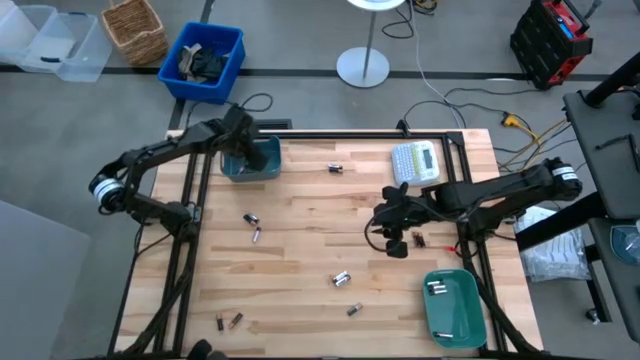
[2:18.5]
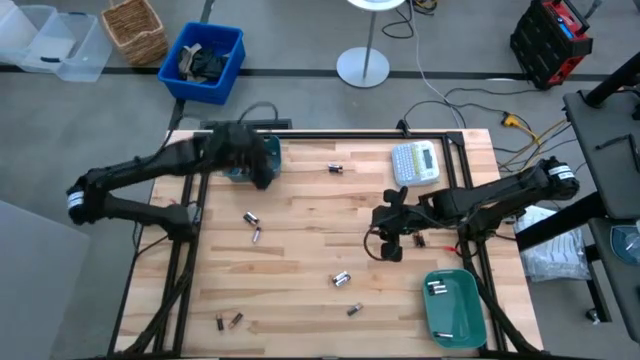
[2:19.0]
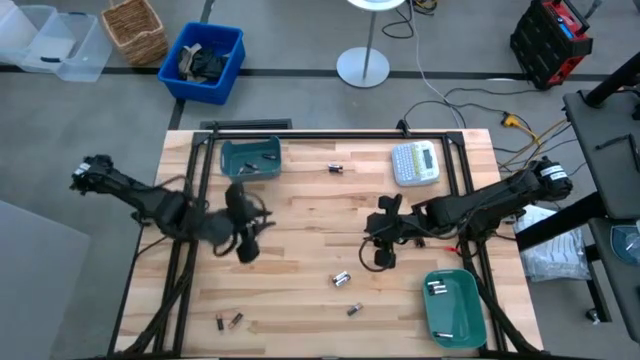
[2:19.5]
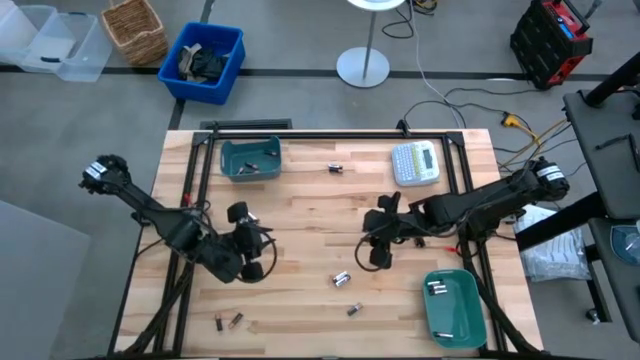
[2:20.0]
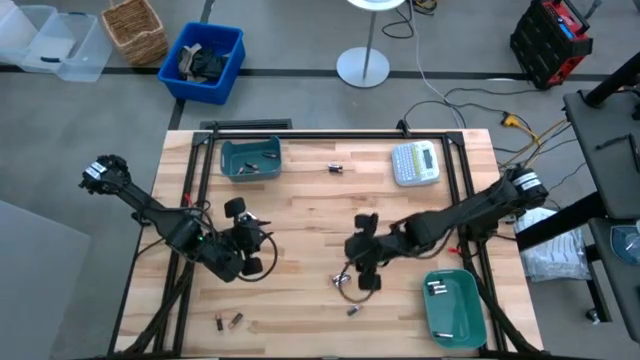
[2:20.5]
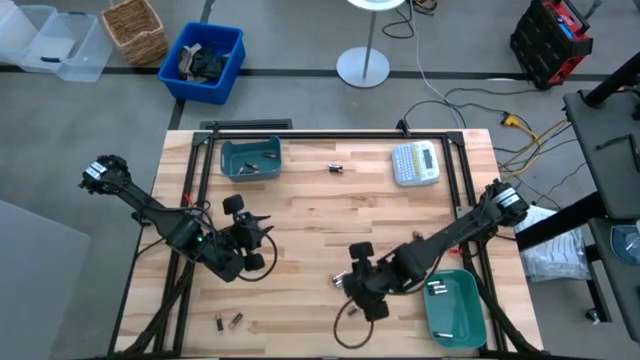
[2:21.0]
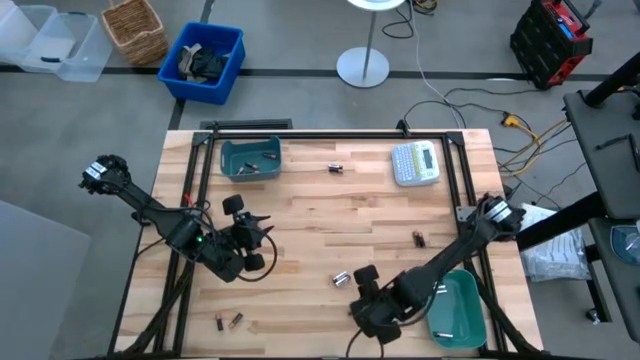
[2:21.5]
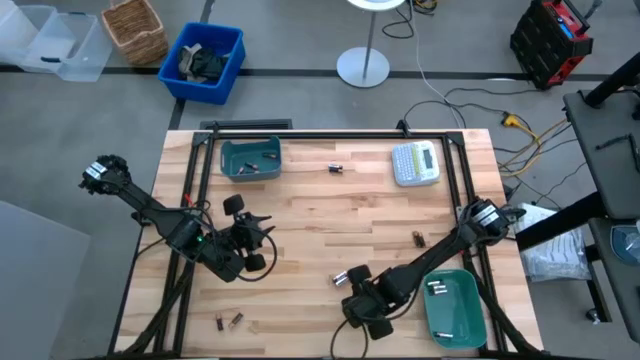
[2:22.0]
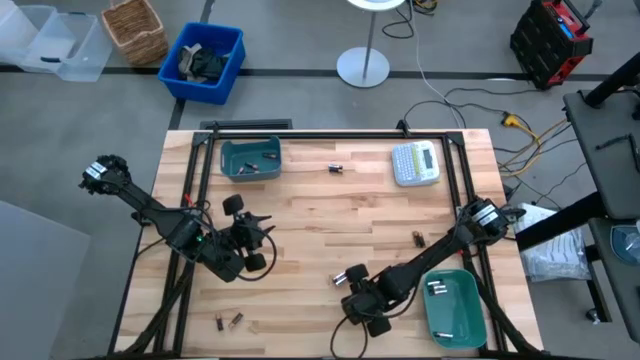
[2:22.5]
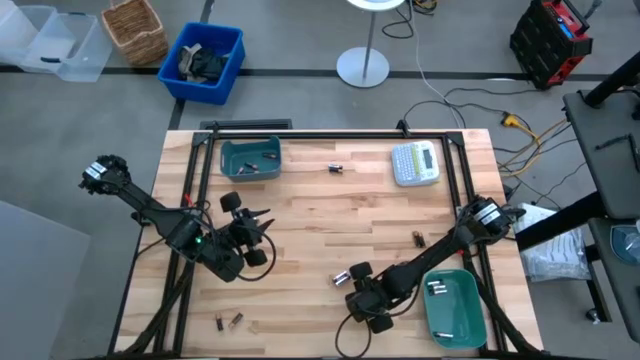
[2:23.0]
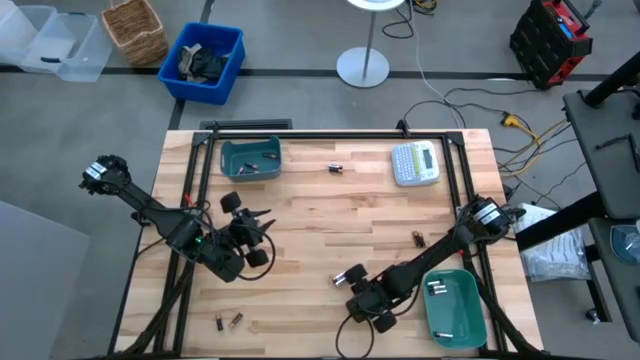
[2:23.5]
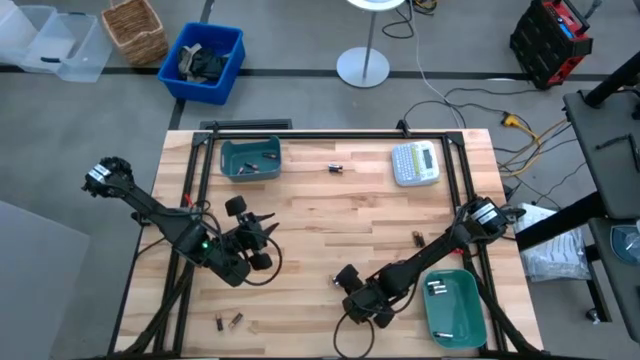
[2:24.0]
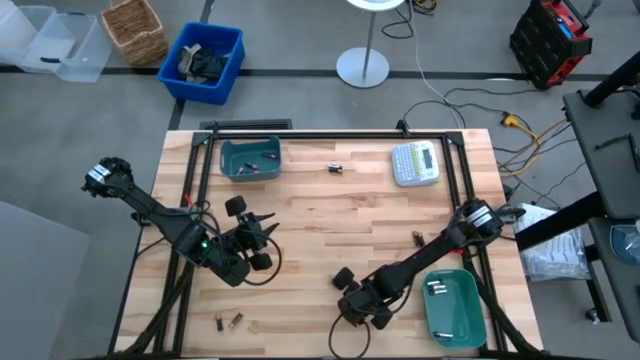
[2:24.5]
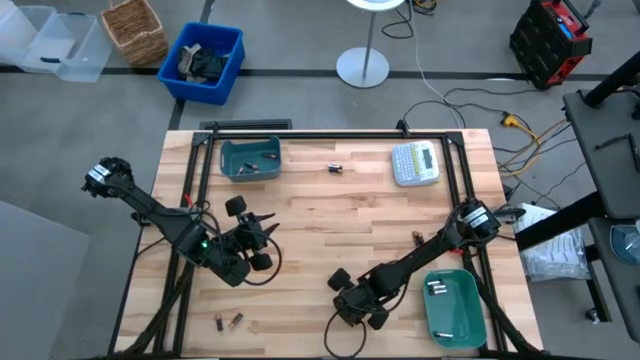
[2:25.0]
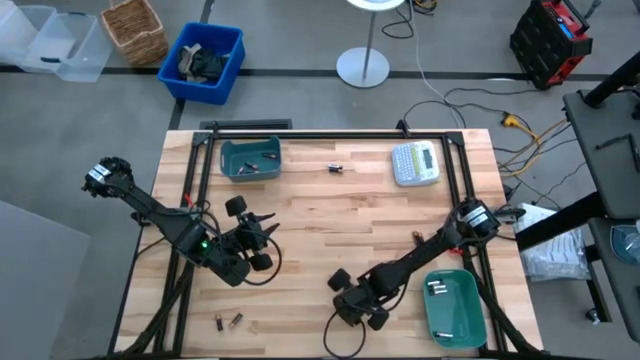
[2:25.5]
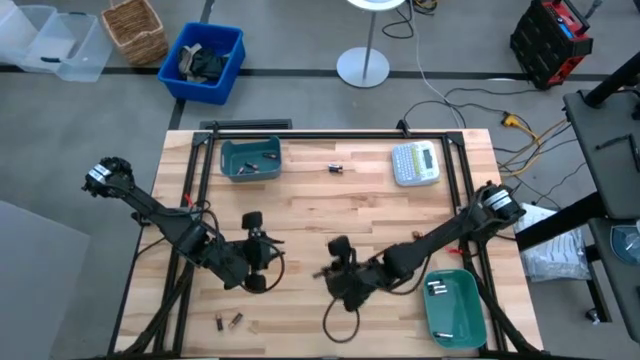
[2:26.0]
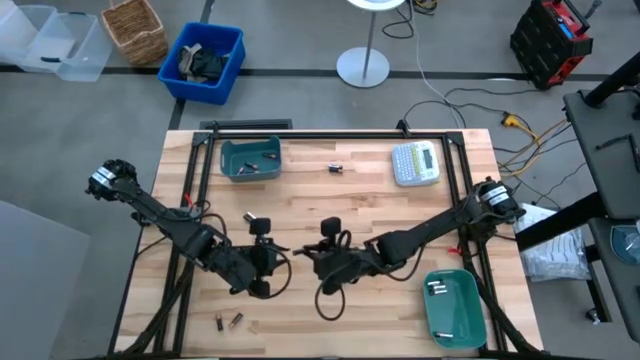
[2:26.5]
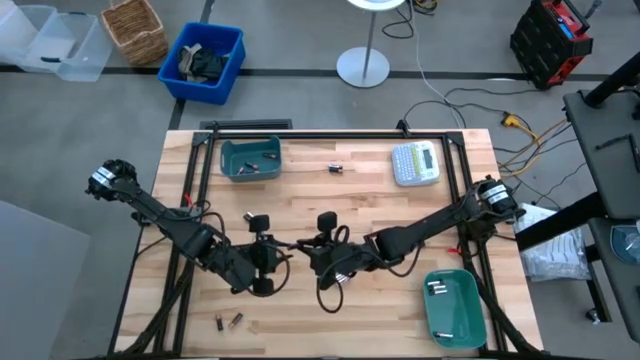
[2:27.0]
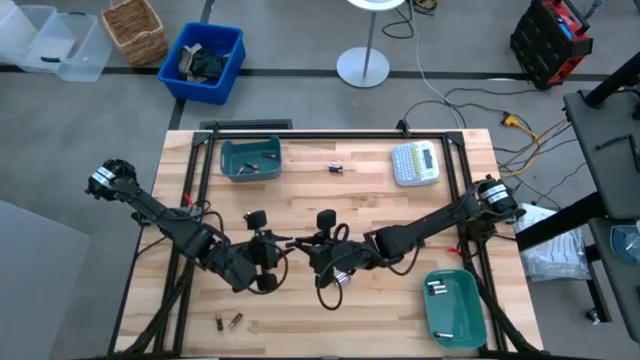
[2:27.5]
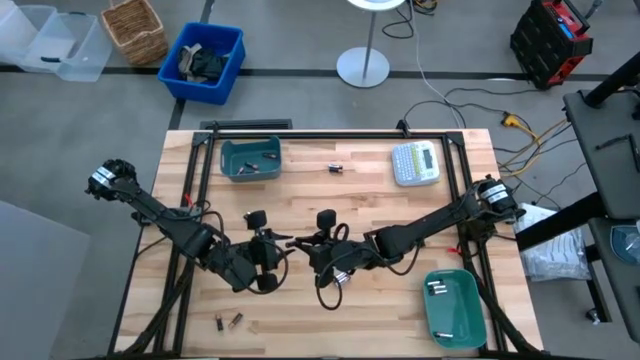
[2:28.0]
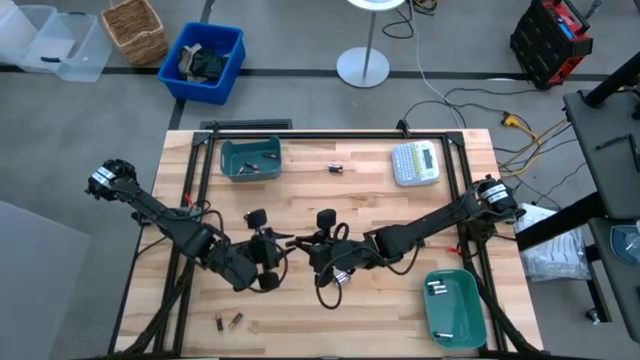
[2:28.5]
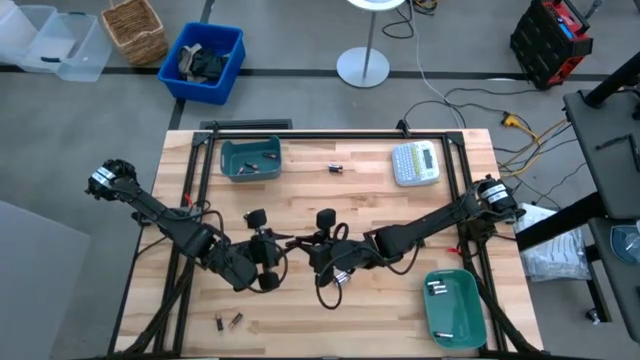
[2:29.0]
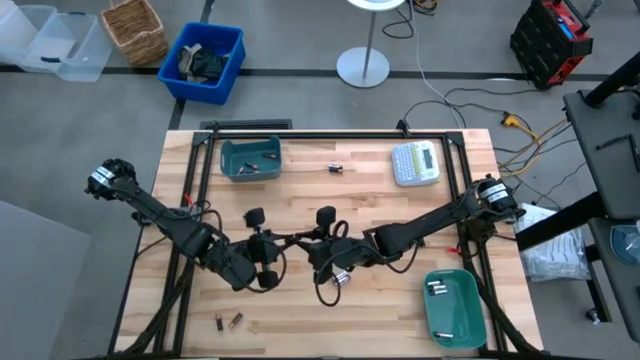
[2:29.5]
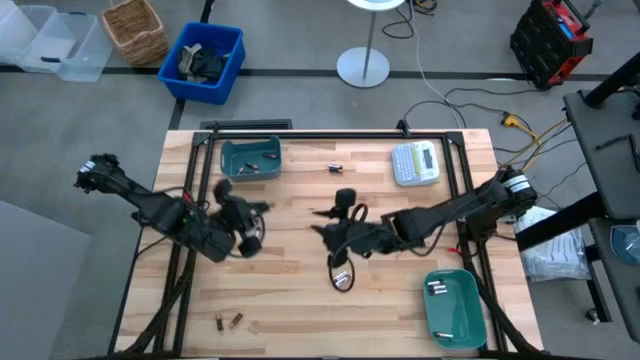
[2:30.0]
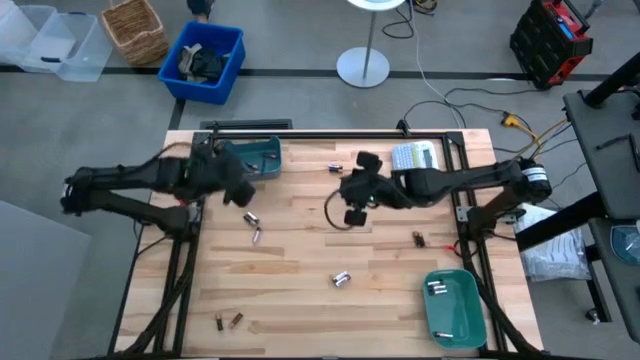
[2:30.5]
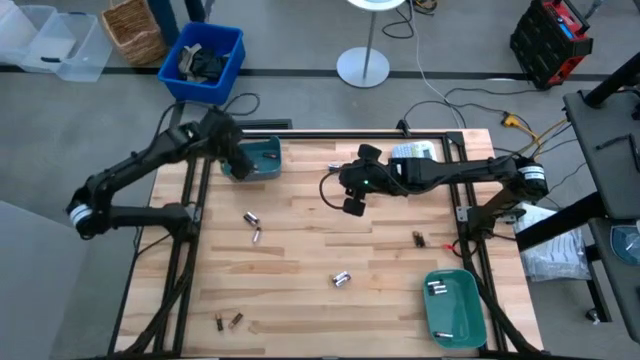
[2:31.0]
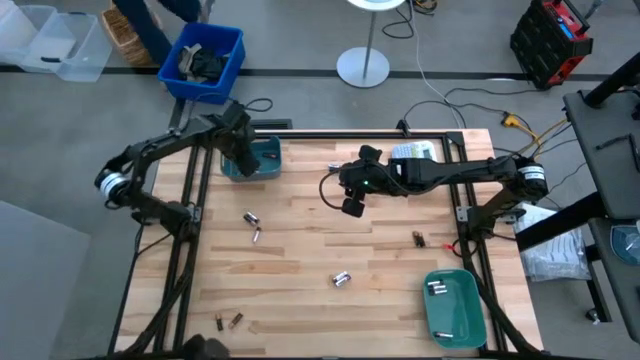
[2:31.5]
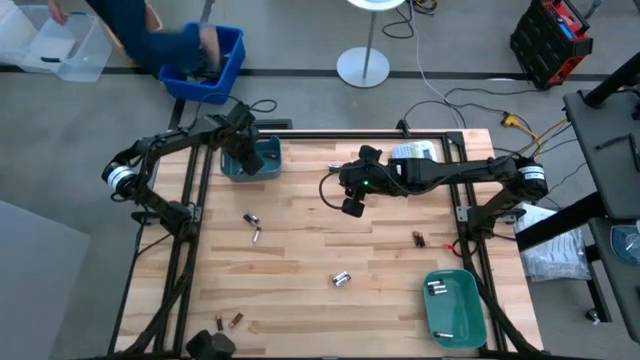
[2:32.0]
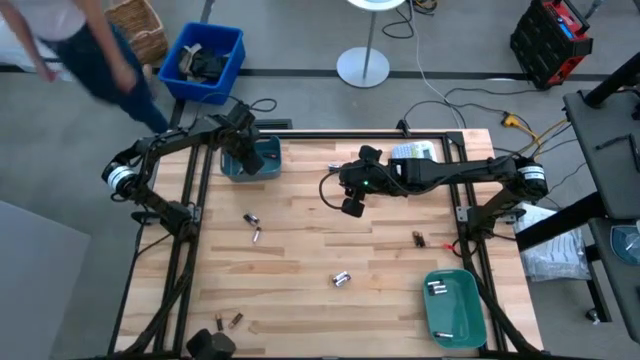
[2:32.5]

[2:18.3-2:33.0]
Task: Sort batteries
Put the black battery into the blue bin

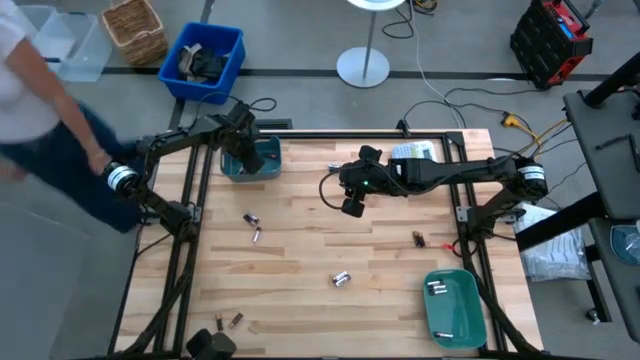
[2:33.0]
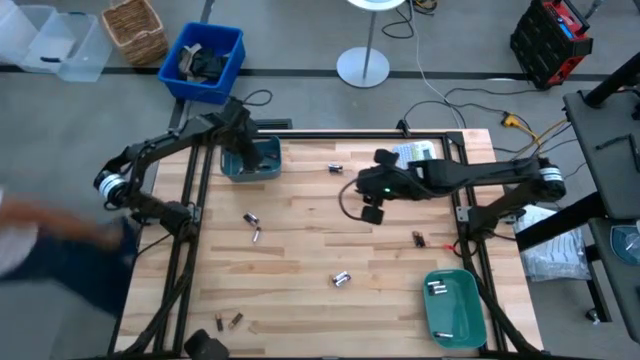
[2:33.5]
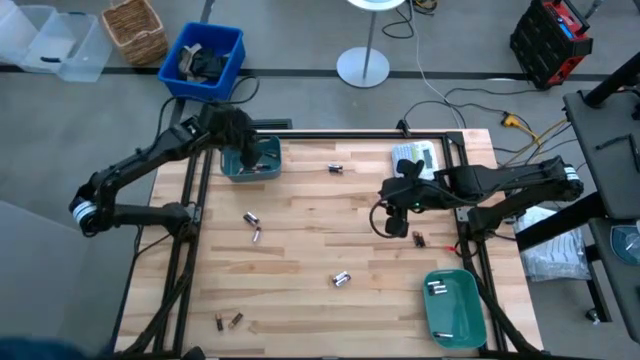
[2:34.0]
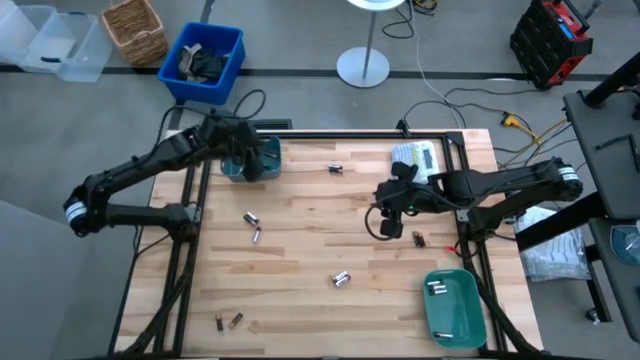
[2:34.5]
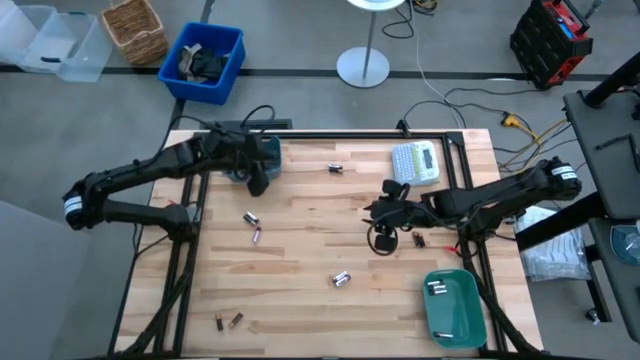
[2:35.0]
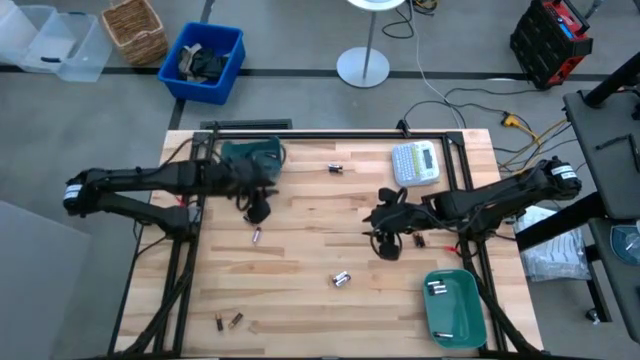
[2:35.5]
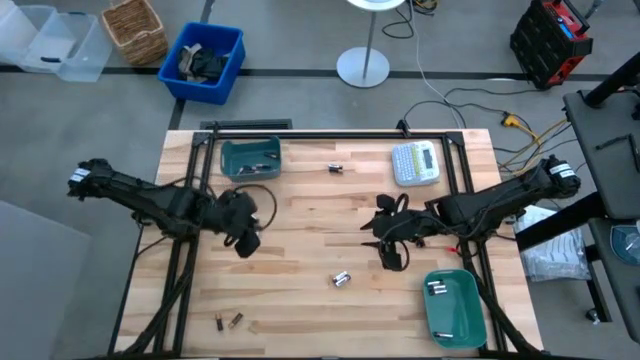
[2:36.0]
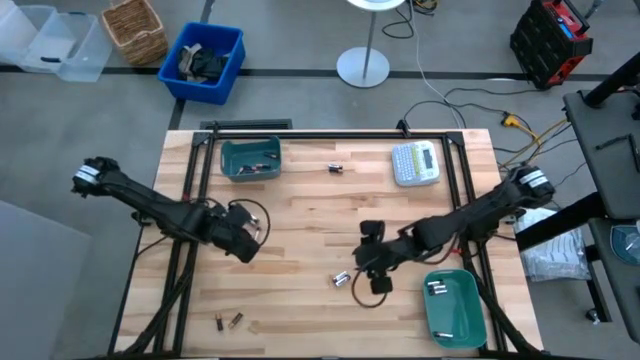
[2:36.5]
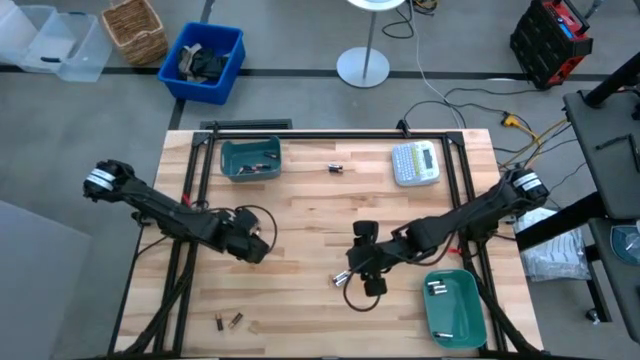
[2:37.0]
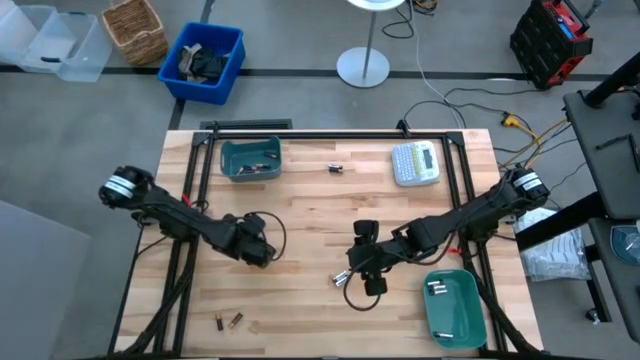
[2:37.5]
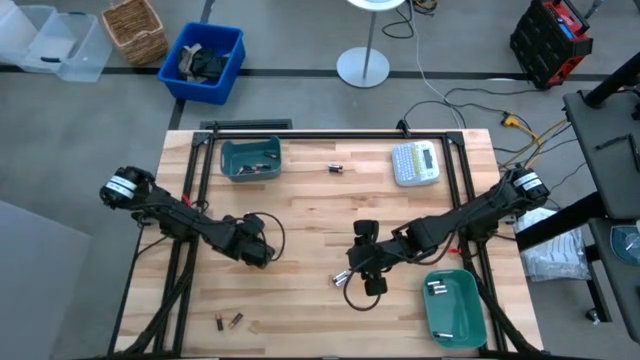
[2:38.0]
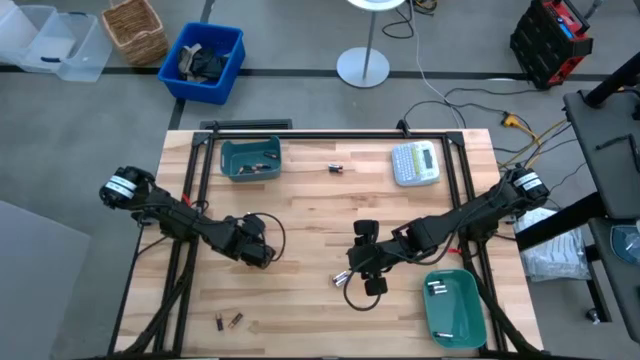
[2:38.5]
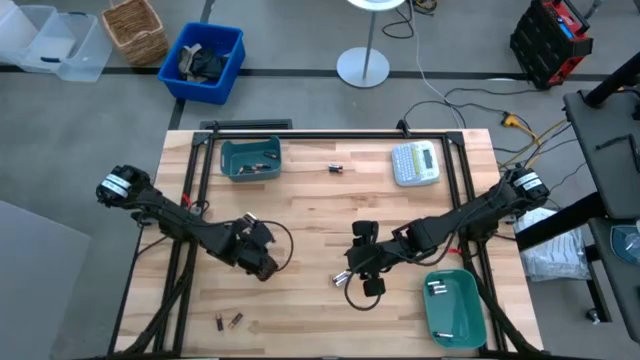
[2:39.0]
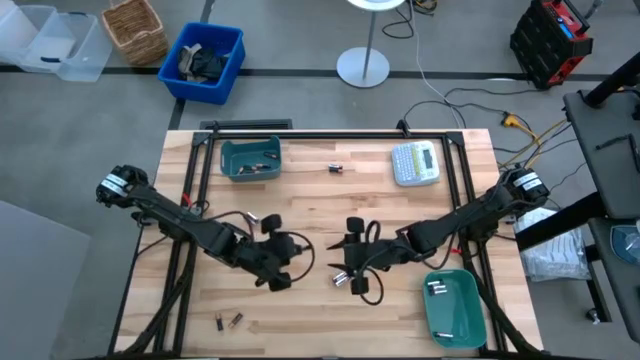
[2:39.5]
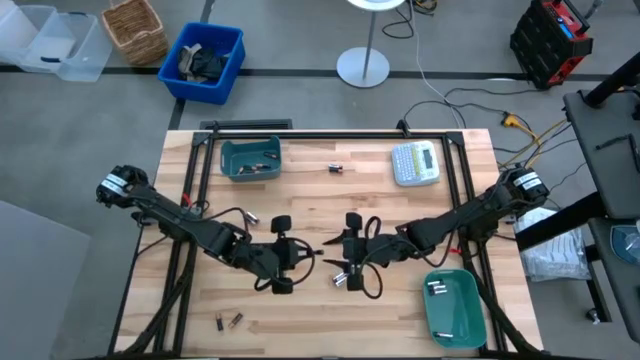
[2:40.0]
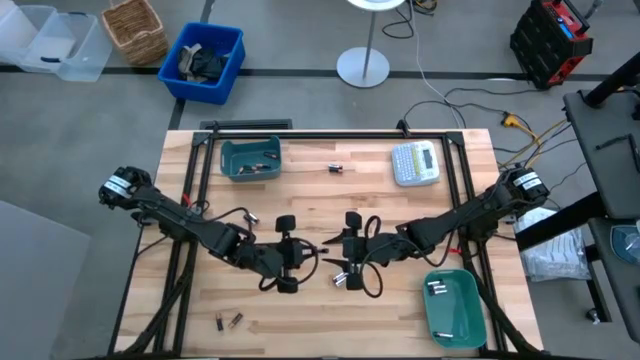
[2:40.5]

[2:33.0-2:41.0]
Put the silver battery into the green bin
